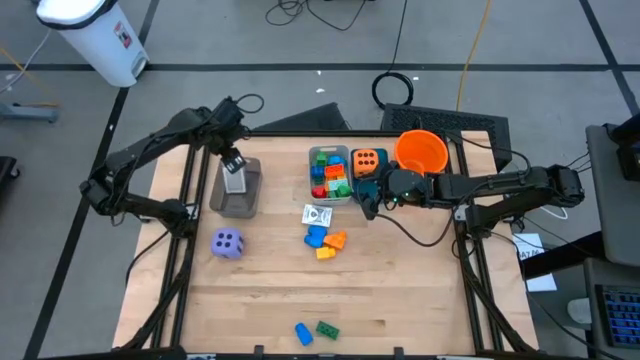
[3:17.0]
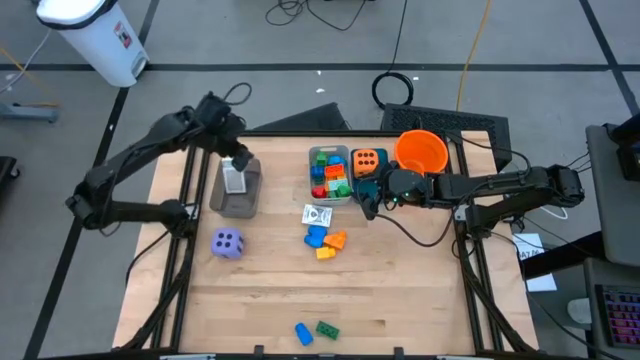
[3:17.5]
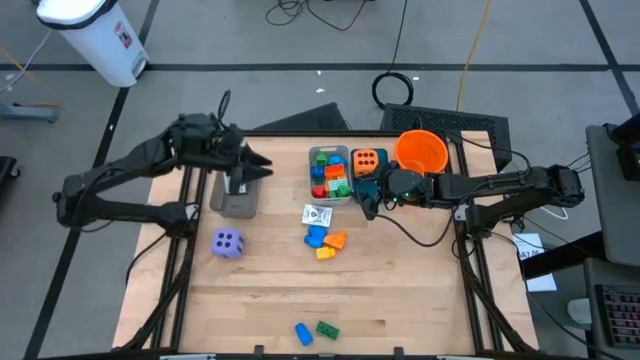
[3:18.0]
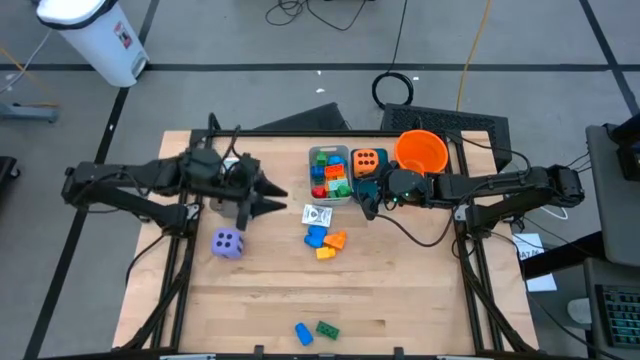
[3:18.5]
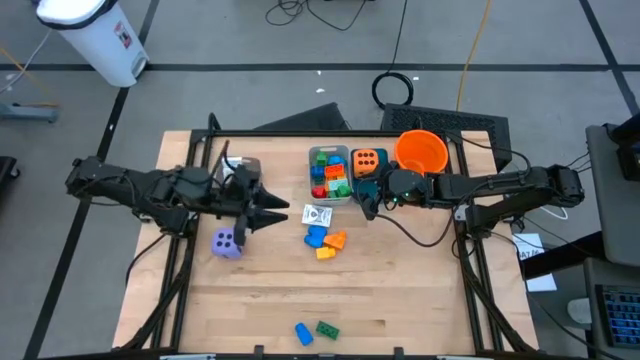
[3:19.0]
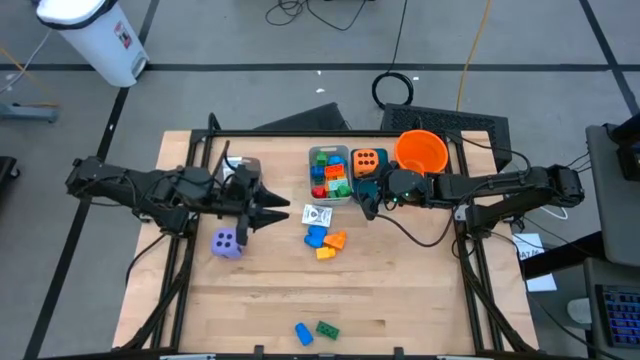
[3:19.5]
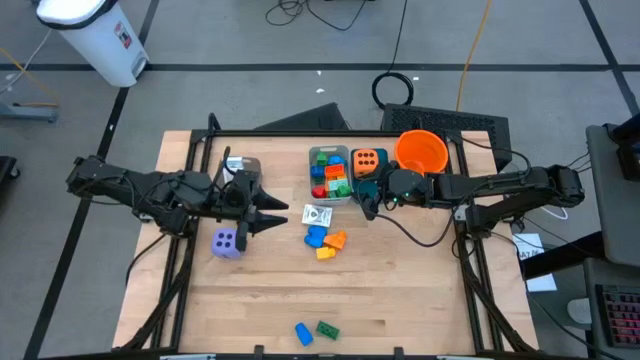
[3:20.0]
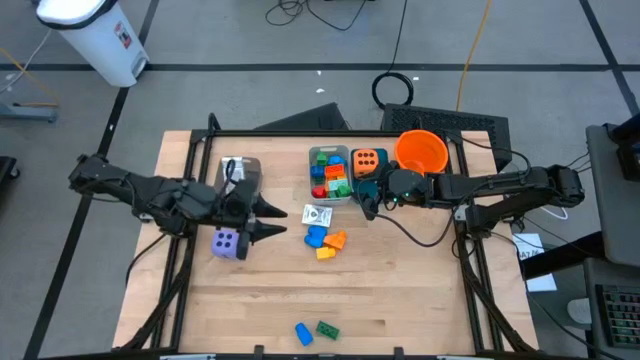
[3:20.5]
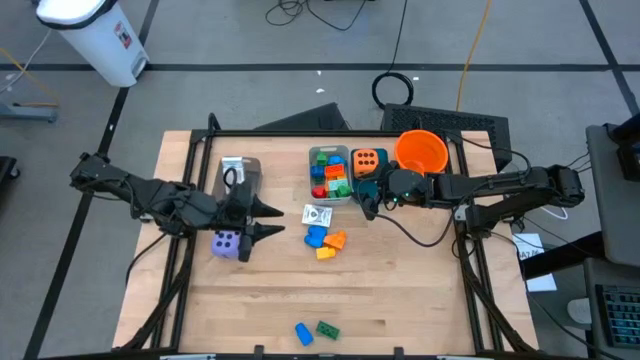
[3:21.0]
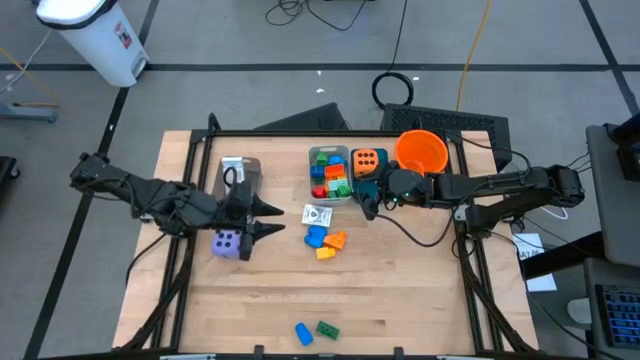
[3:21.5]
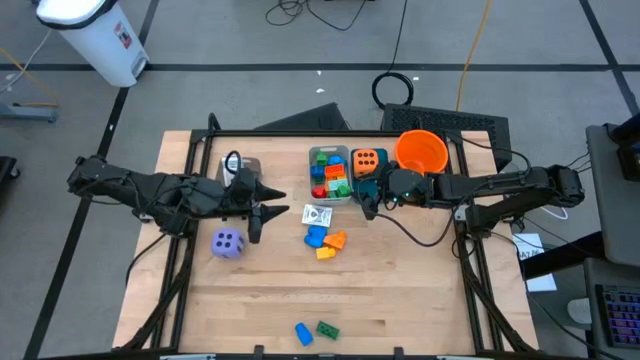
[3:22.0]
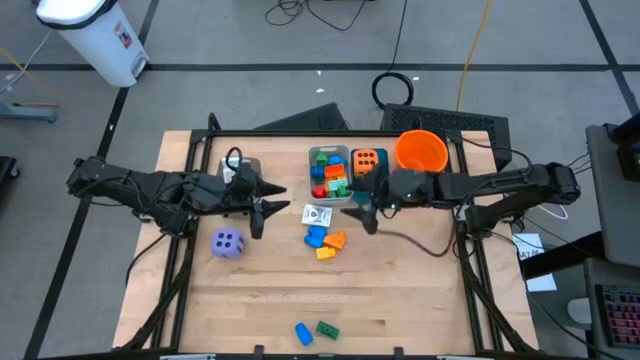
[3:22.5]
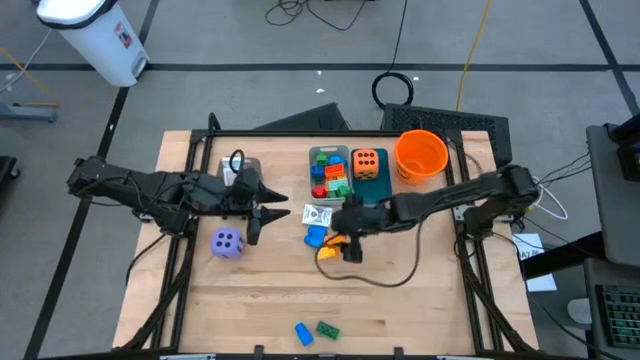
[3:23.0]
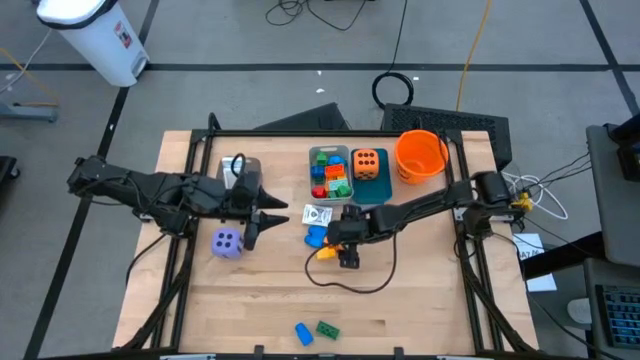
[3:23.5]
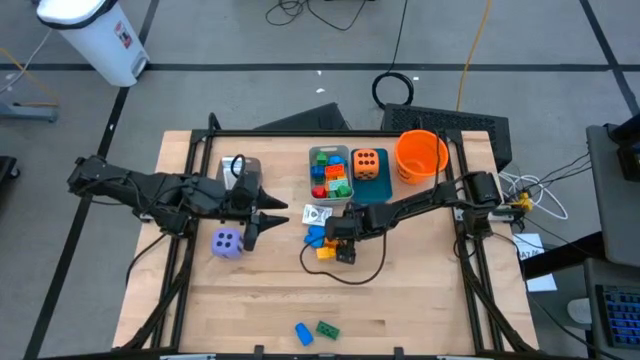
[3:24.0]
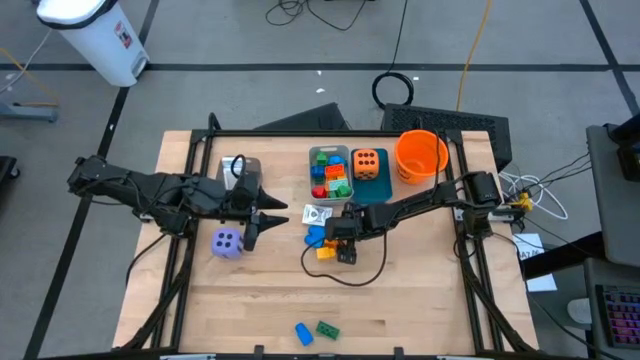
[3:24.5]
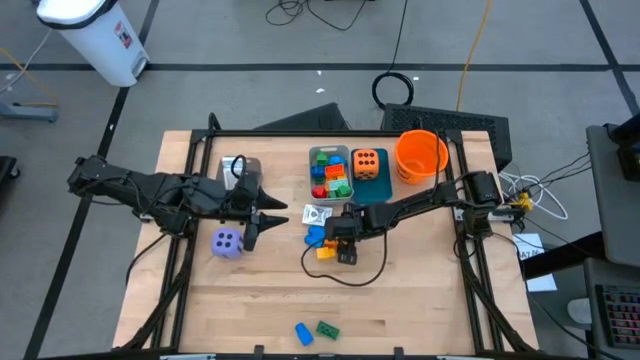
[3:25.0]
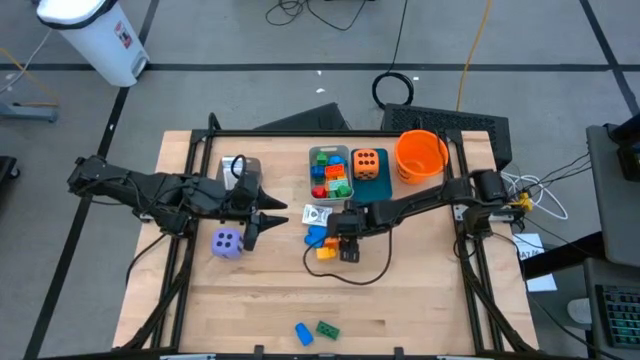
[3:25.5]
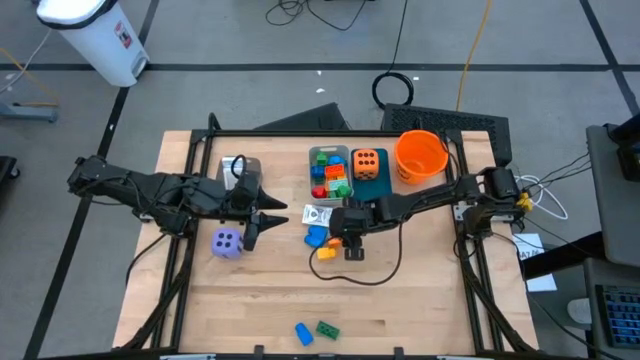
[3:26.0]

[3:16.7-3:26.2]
Task: Pick & Place Toys
Put the light orange game piece into the gray bin

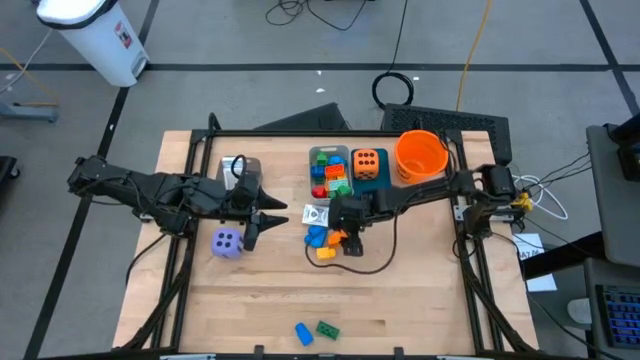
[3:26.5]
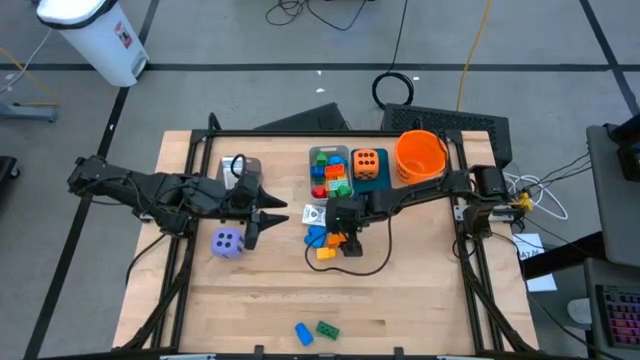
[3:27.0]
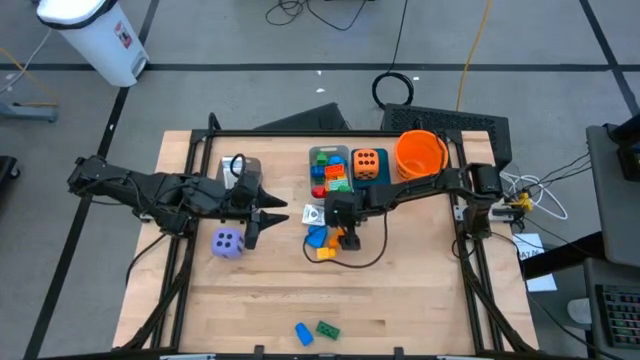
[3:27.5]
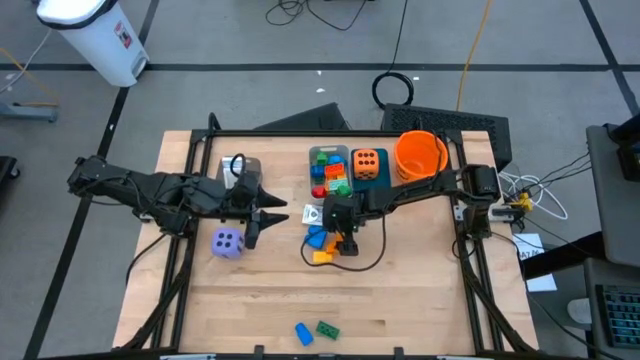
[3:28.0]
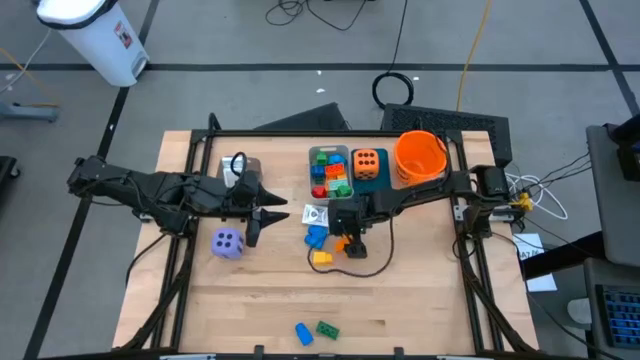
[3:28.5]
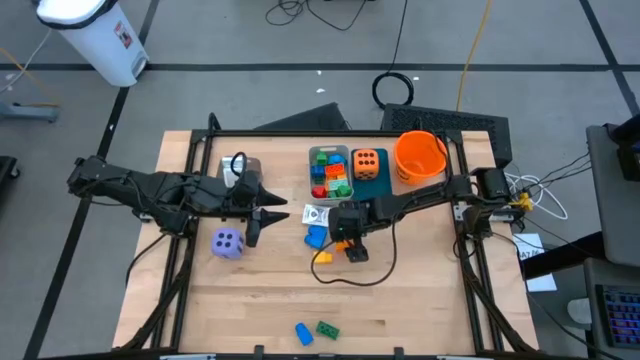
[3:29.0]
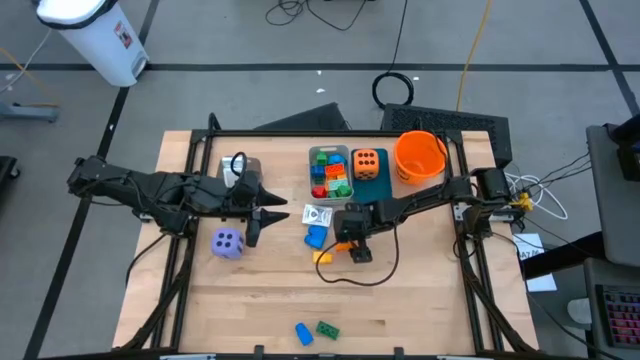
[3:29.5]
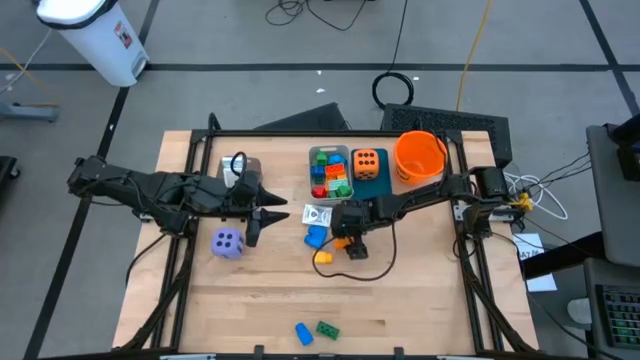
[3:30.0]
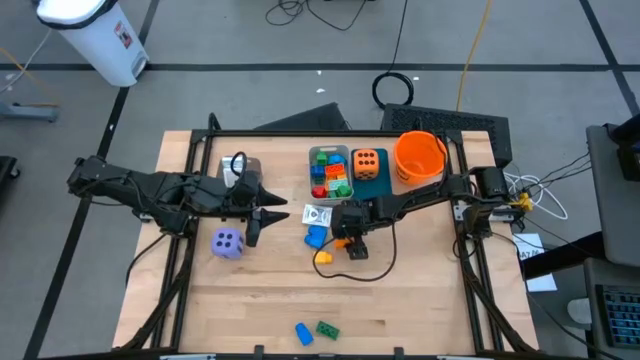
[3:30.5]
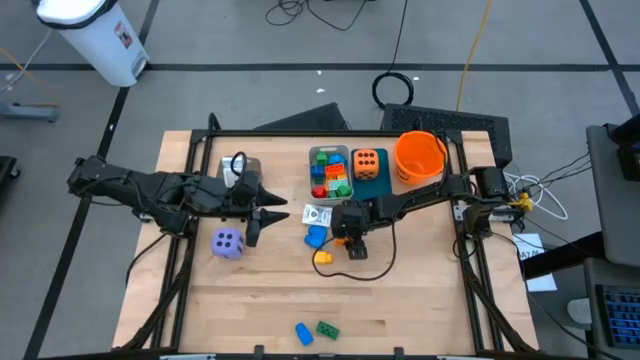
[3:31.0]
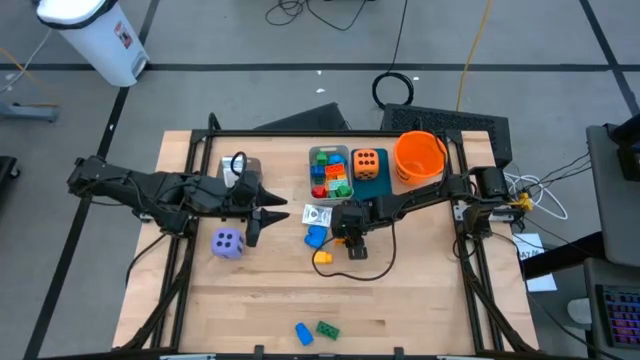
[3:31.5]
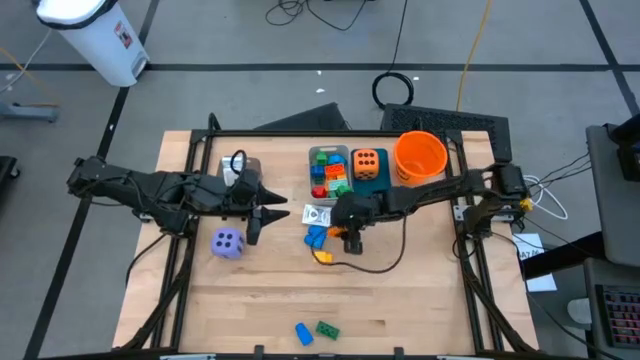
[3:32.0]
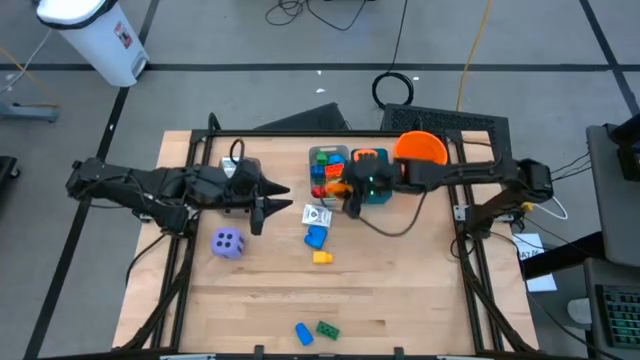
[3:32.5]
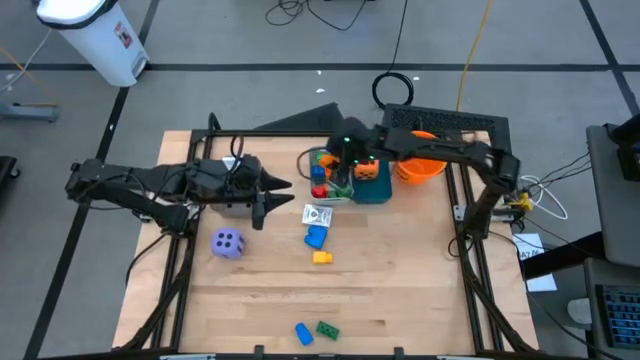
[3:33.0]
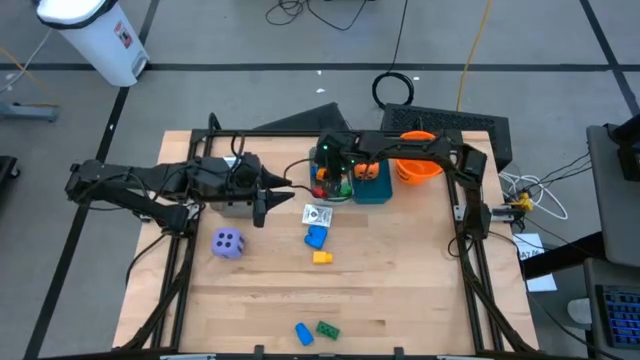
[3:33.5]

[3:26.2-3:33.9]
Put the light orange game piece into the gray bin

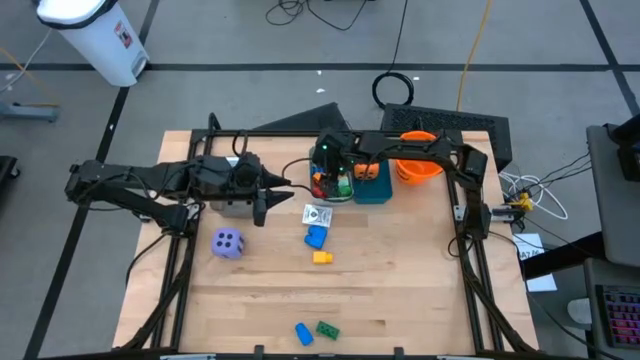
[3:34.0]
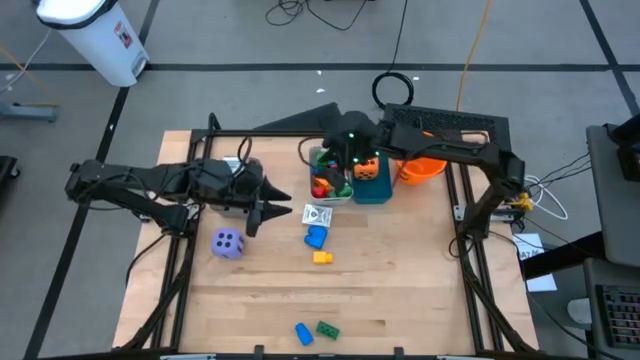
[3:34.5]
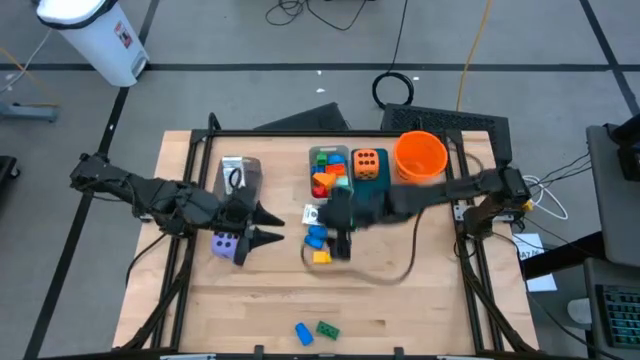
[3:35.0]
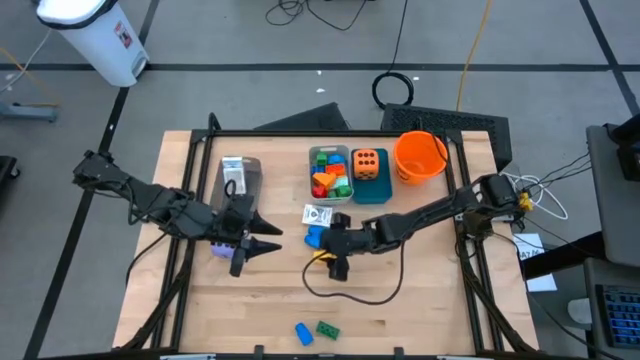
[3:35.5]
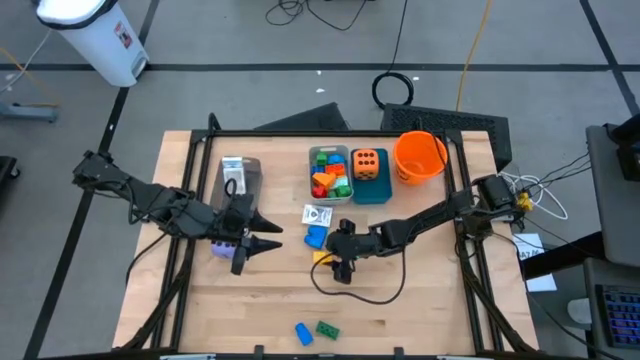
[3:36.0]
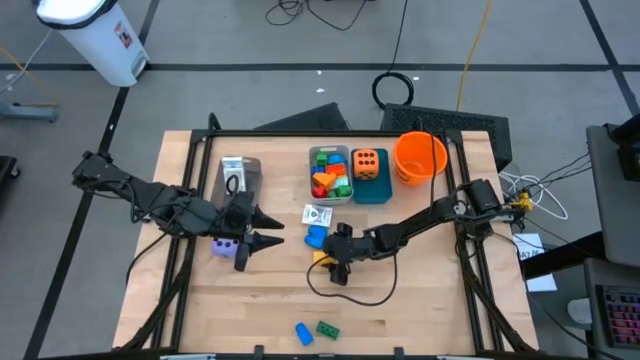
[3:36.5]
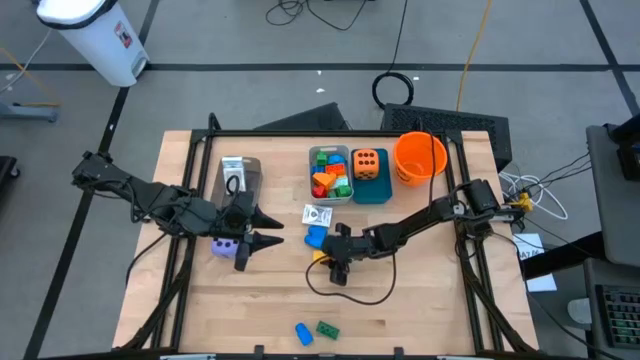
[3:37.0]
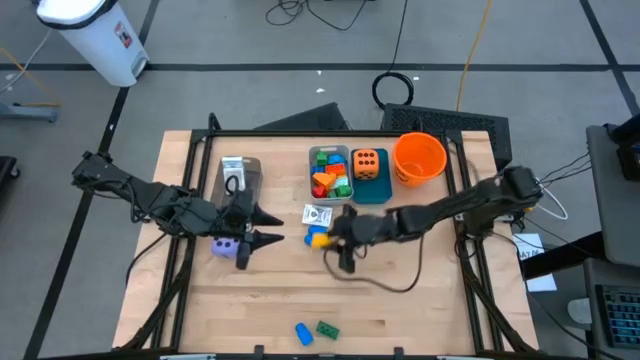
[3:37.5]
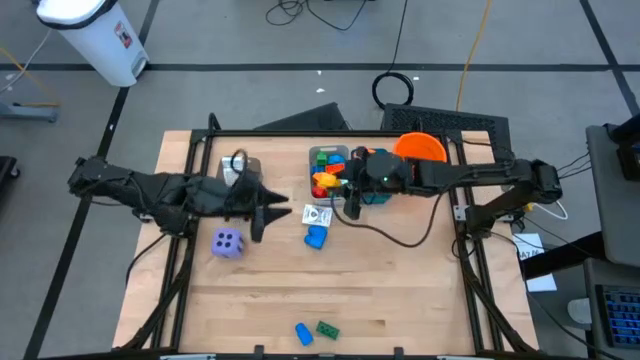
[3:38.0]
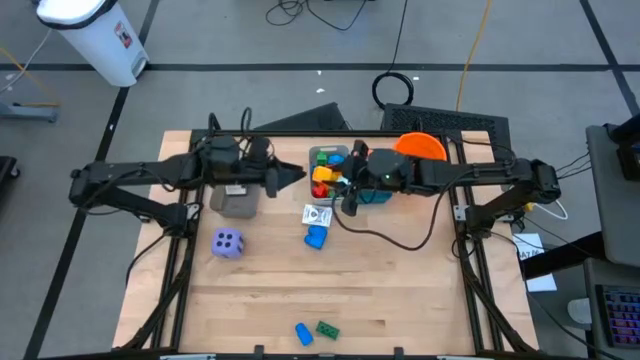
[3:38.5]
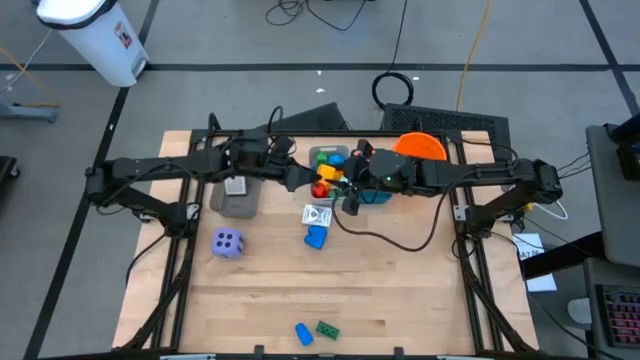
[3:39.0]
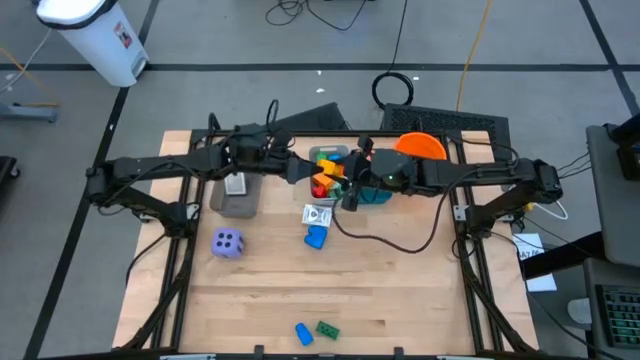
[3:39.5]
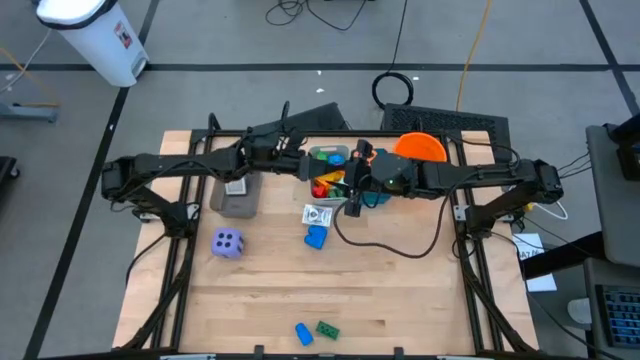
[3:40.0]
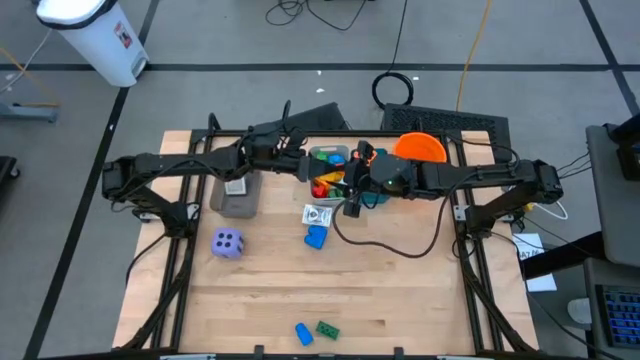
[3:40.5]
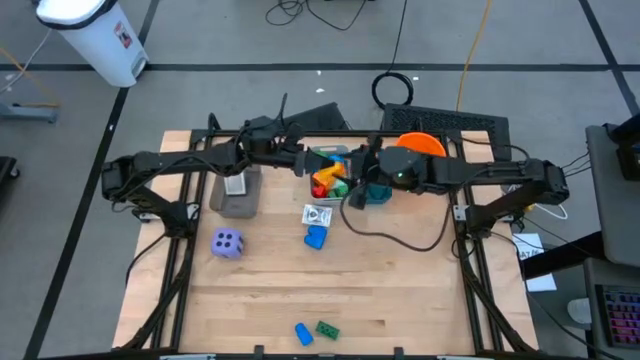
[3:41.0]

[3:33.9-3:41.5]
Put the yellow game piece into the gray bin
